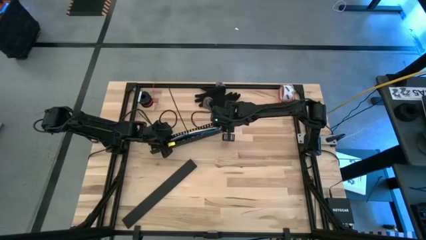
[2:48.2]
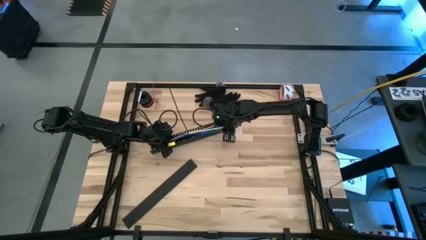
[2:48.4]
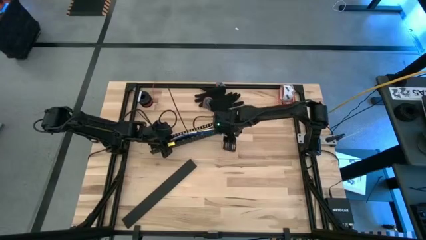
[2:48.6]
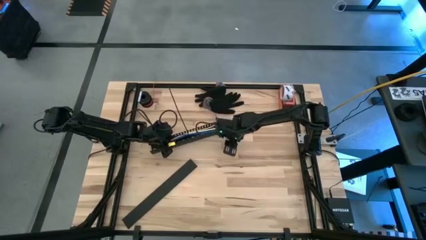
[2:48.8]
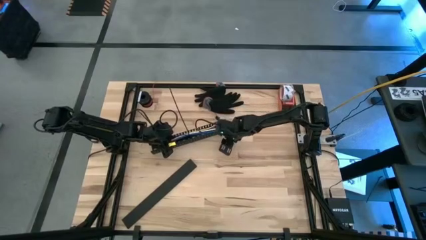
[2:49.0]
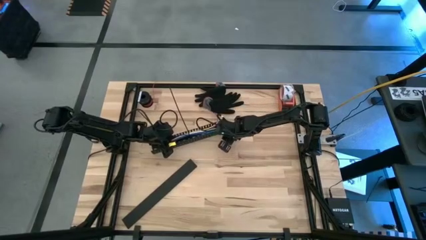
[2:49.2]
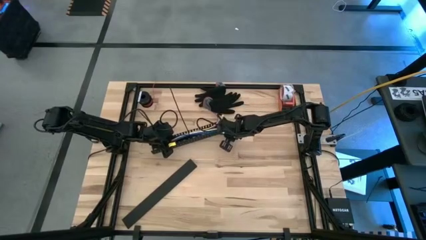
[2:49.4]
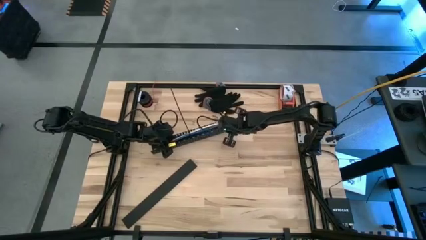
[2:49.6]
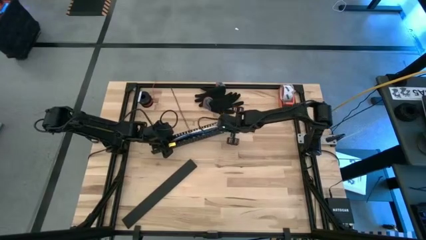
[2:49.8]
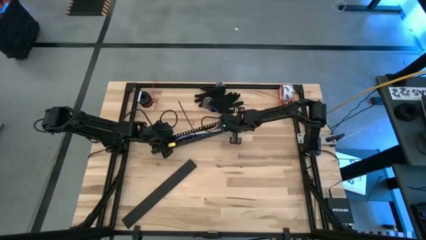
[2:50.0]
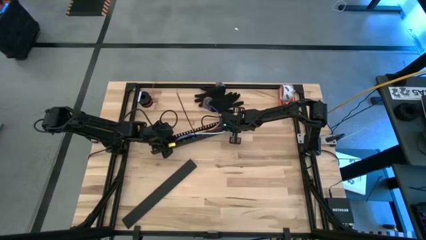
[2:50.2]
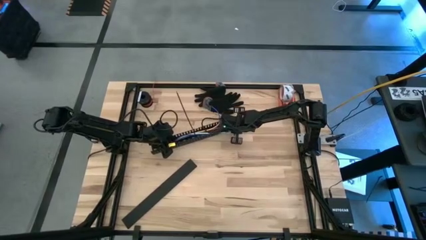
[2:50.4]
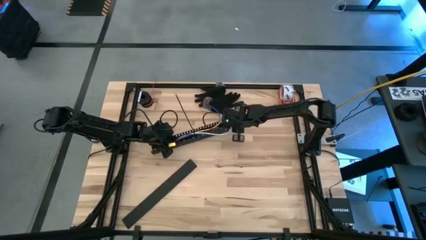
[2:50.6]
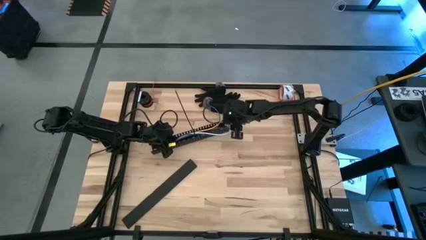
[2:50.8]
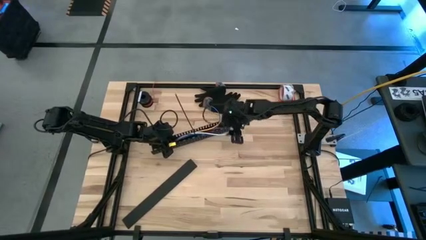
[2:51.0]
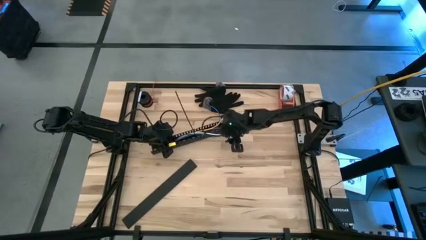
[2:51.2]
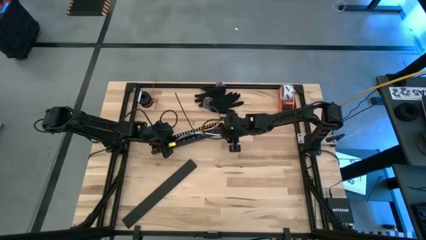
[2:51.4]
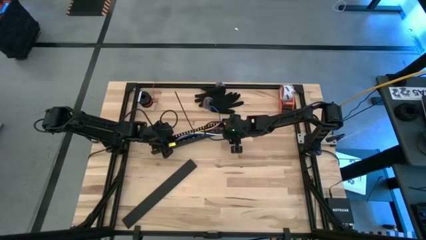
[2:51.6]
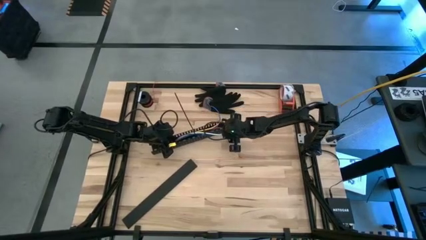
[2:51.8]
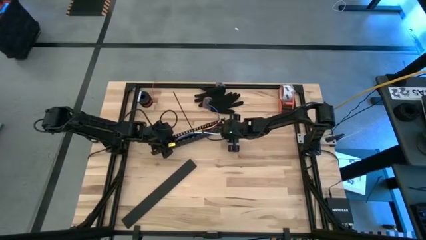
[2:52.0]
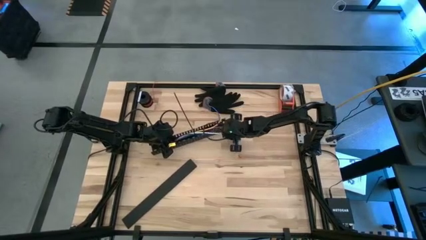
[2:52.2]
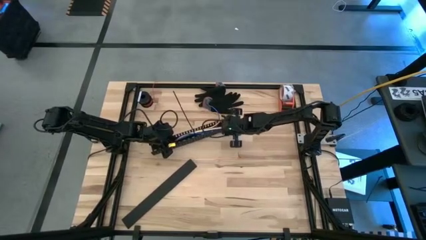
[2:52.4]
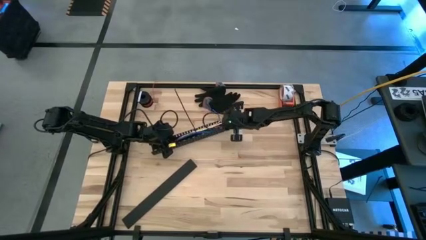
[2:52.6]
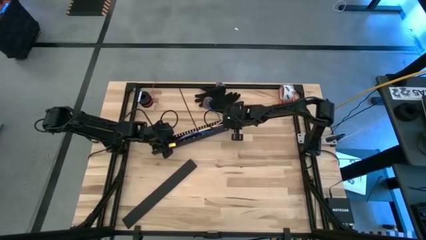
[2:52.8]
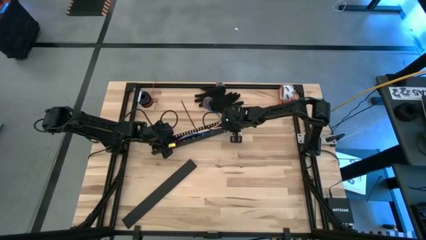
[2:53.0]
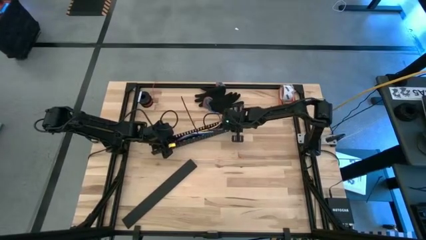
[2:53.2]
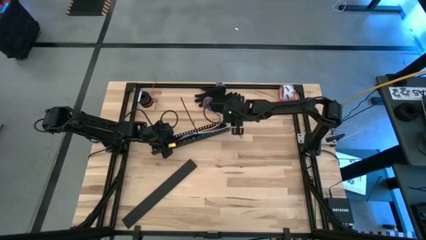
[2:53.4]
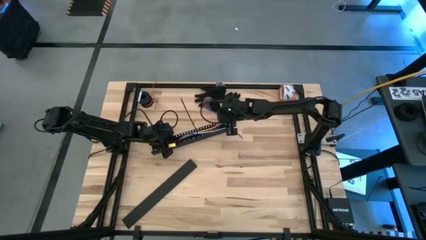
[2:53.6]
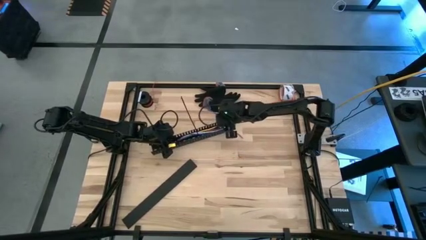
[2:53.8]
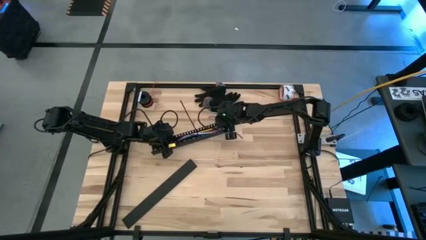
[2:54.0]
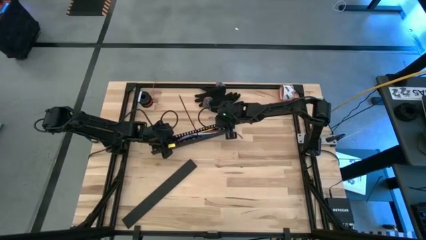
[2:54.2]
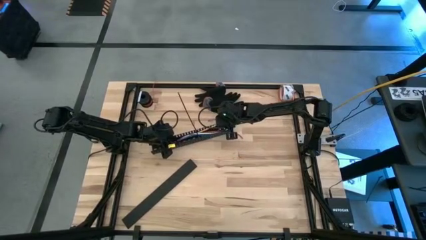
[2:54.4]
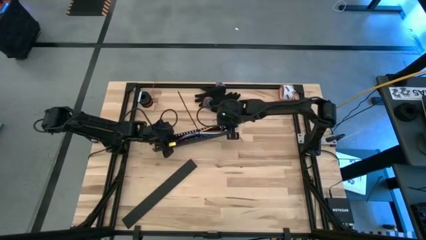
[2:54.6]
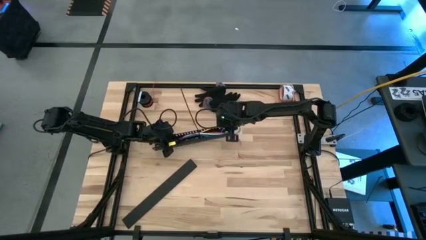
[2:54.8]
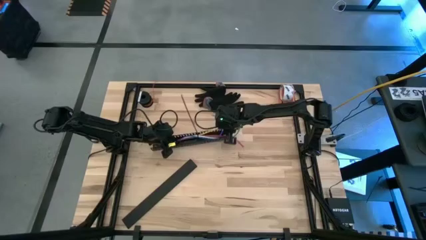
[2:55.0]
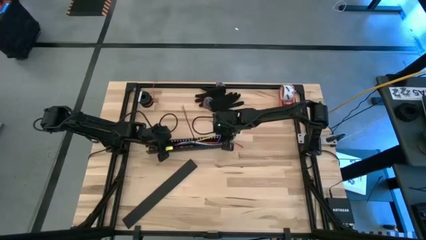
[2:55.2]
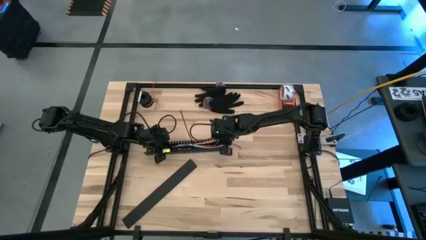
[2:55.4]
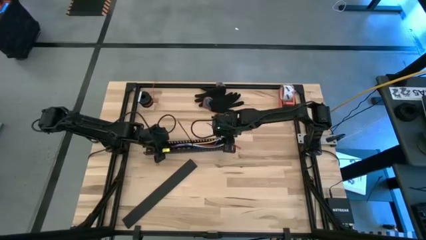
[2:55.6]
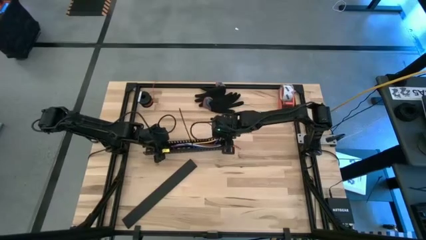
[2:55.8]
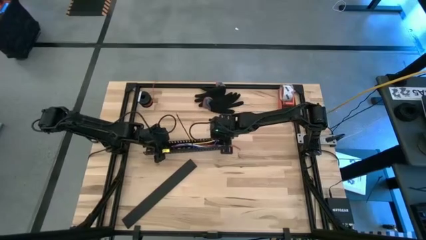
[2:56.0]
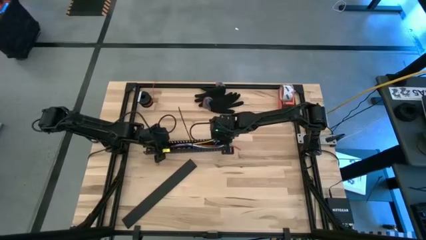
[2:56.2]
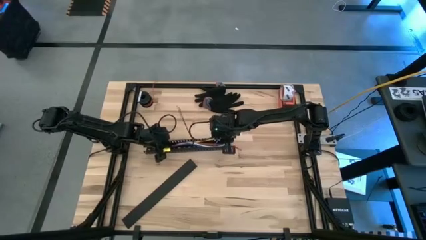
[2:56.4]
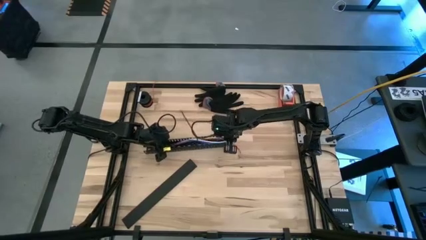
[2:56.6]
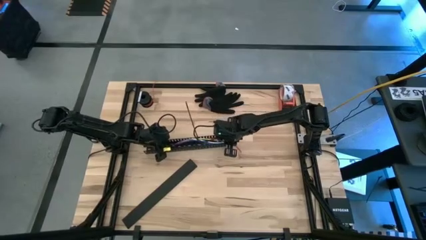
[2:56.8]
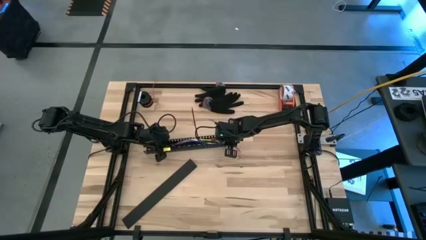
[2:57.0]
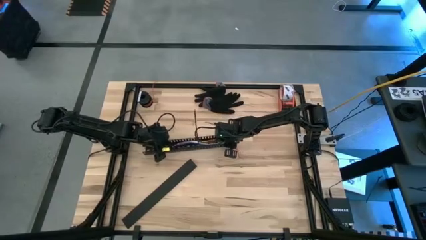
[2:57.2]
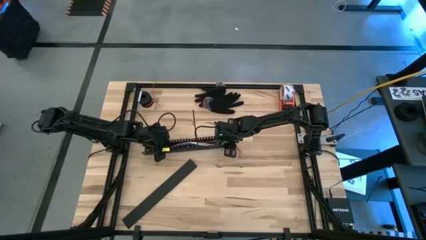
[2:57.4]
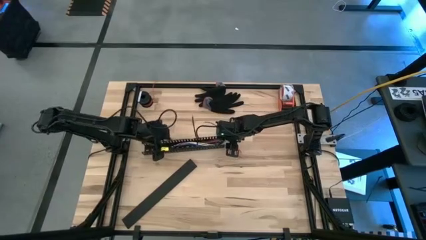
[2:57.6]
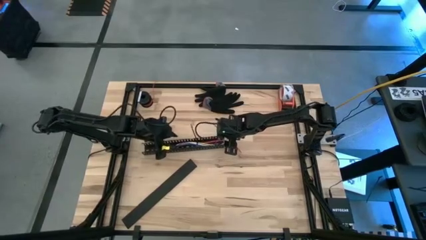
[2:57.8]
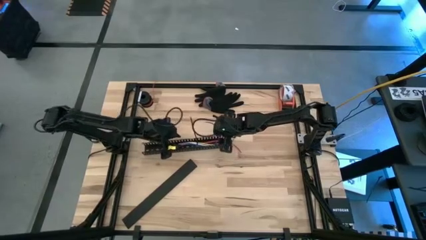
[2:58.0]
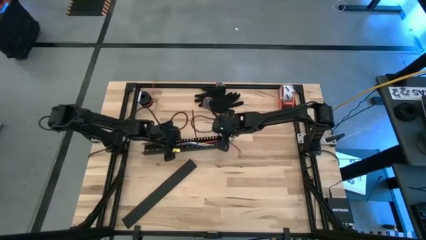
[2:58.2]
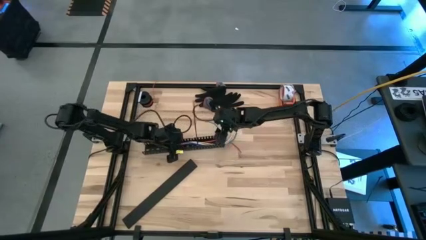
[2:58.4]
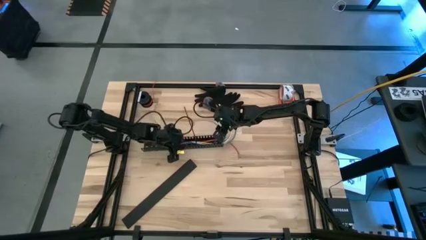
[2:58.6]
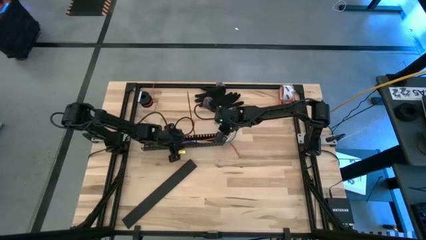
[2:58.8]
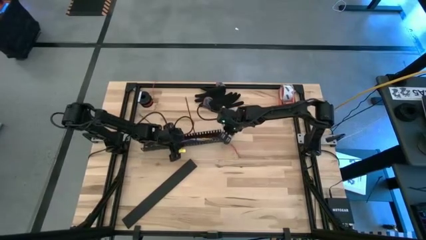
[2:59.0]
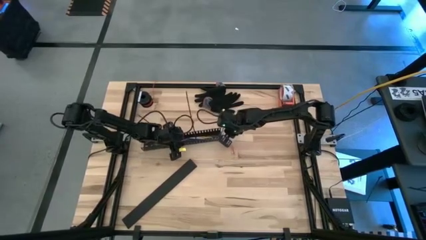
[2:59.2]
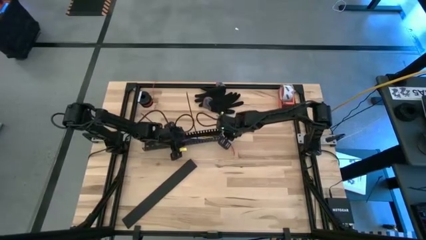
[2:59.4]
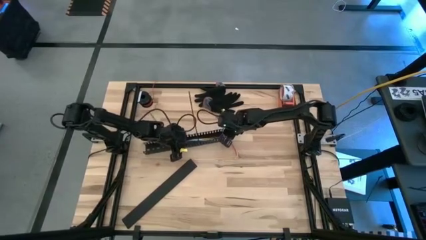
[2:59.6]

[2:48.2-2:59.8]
Task: Ziptie cables
Put the ziptied cable wires in a black cable duct

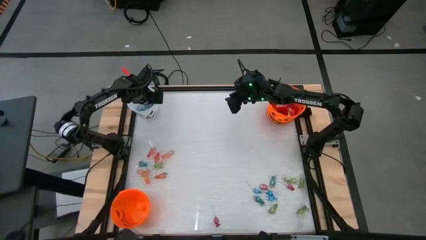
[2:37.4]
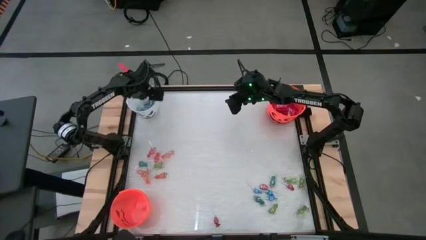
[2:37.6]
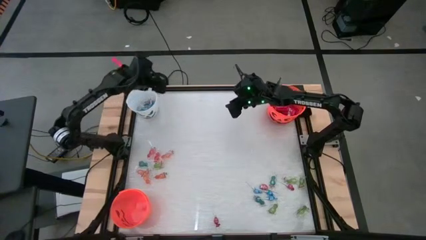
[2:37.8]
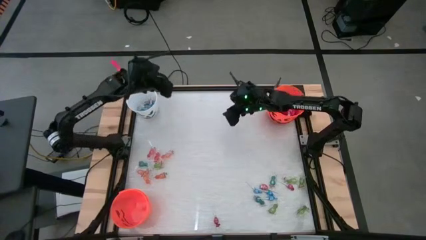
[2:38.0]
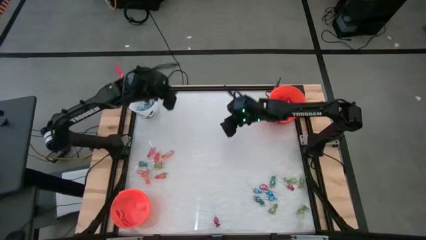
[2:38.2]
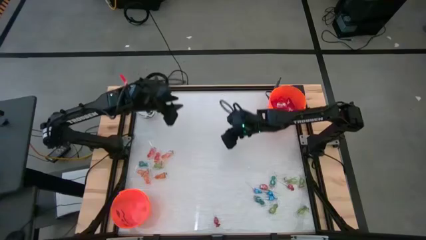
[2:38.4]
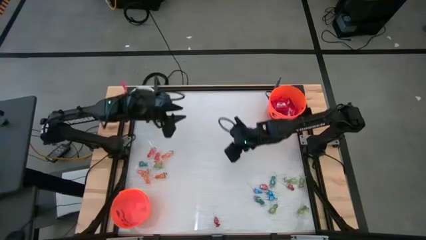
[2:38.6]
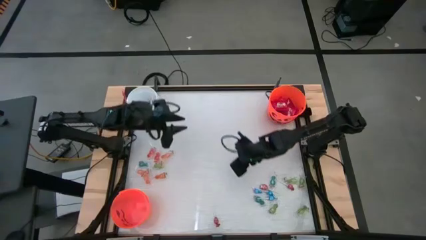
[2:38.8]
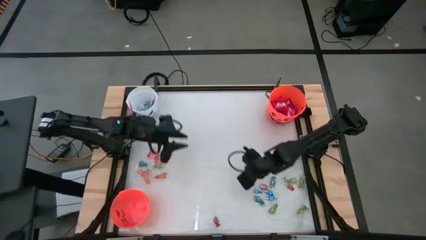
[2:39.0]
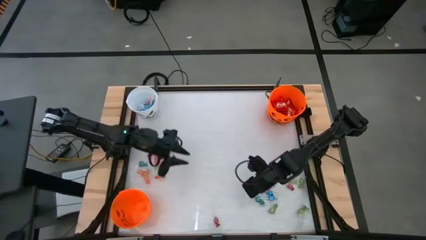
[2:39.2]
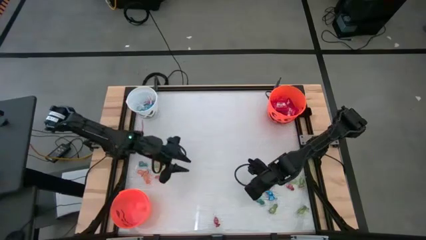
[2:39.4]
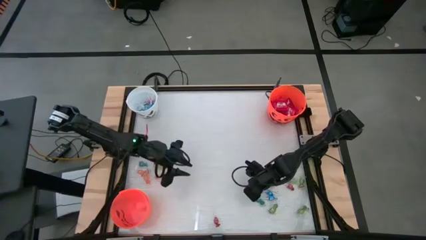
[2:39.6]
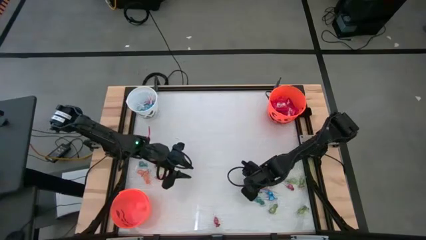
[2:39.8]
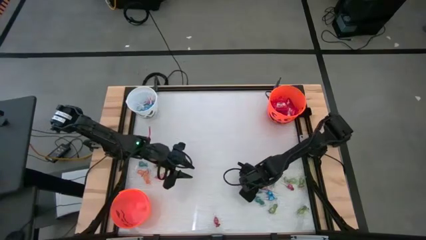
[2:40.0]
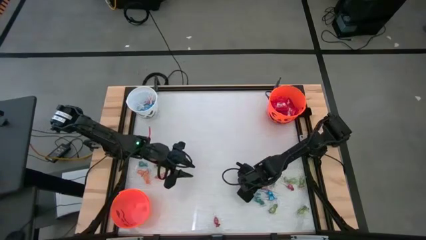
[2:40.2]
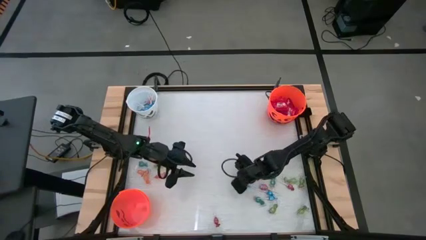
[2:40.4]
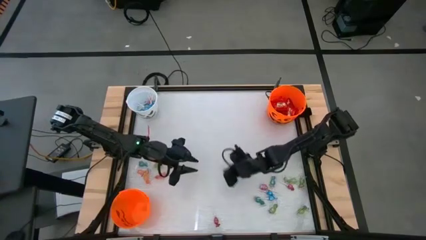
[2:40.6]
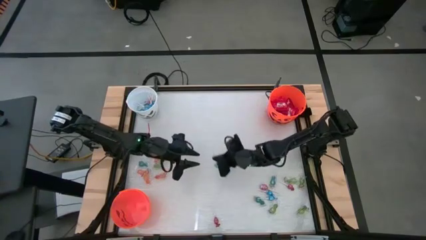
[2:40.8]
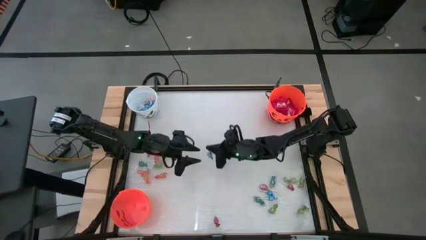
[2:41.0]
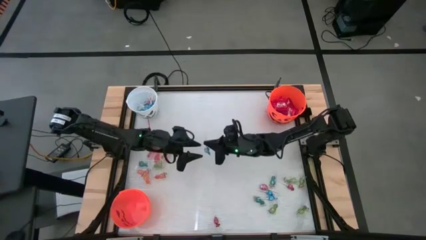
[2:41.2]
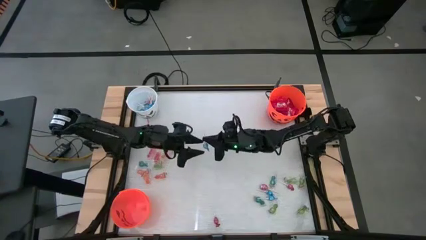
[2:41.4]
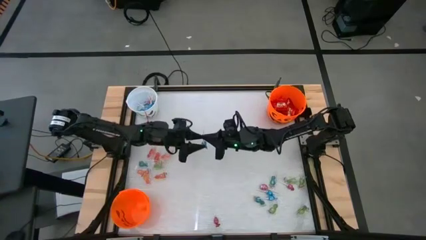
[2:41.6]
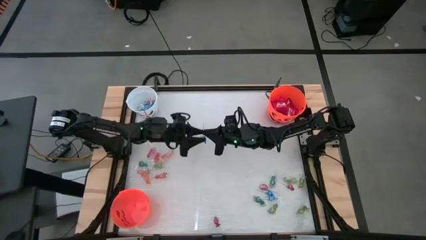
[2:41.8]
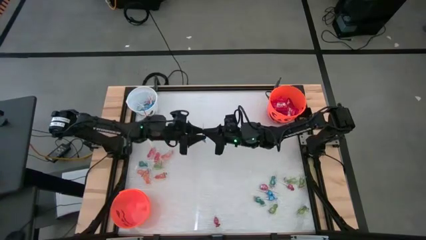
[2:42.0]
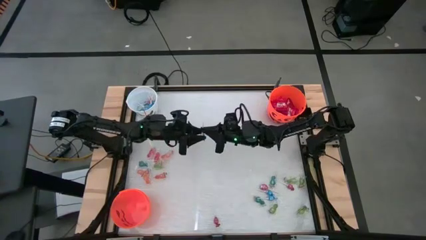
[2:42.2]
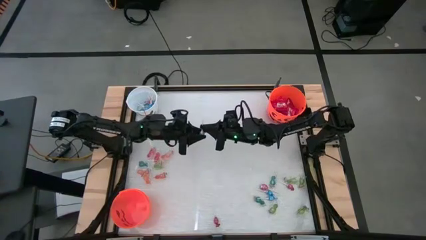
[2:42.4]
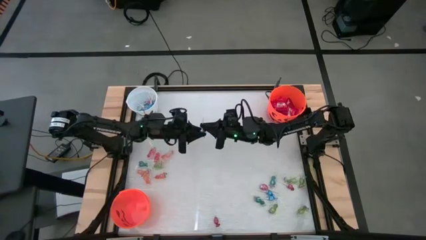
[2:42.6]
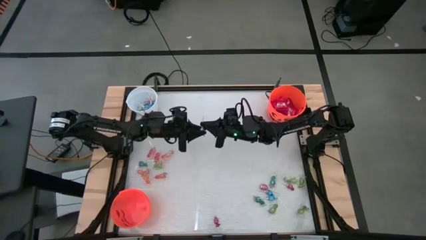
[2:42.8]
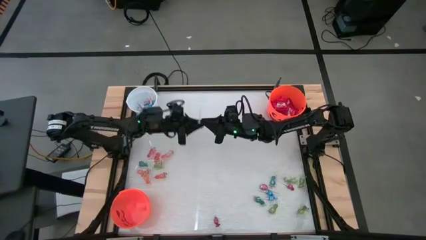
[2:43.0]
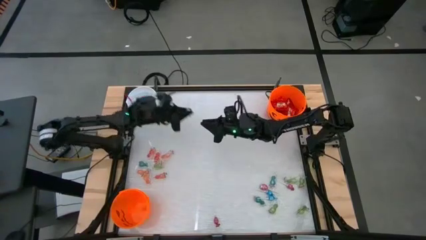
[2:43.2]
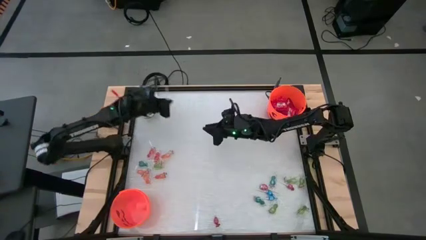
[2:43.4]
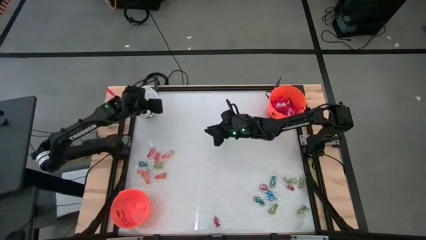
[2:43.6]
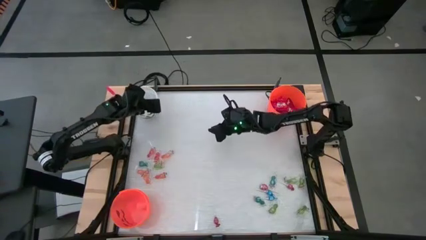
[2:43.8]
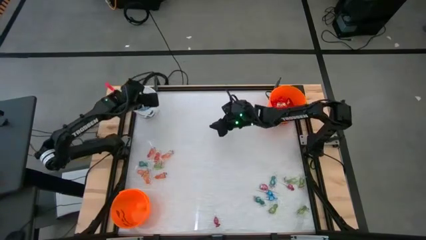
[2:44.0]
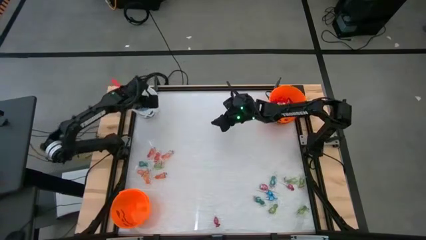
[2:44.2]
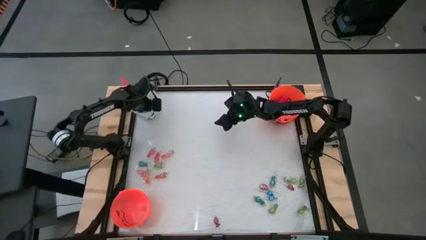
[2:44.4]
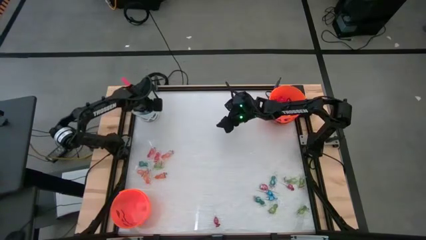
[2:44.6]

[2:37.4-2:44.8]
Task: Sort candy by brand, put in halloween buckets
Put the blue lollipop into the white bucket
